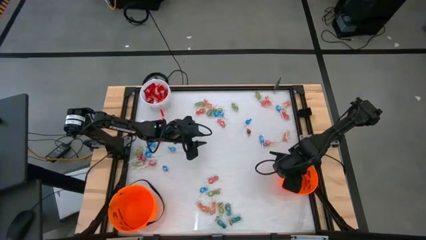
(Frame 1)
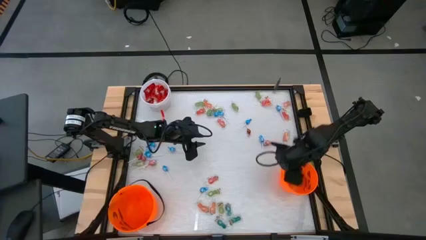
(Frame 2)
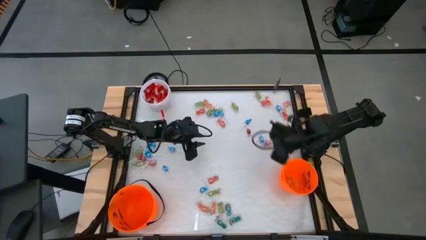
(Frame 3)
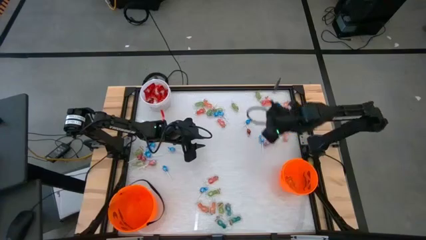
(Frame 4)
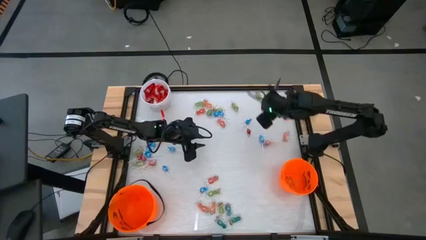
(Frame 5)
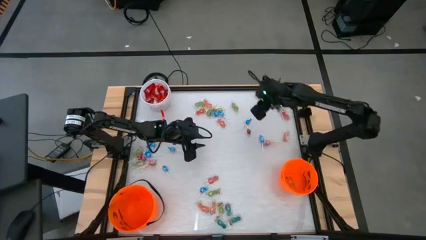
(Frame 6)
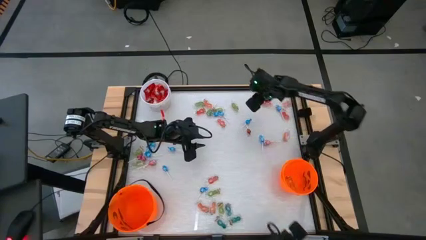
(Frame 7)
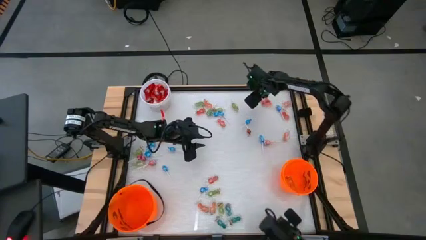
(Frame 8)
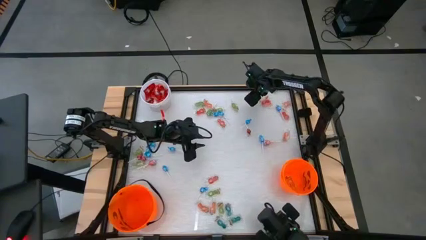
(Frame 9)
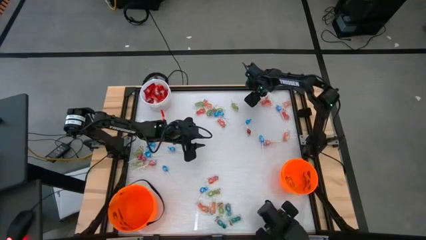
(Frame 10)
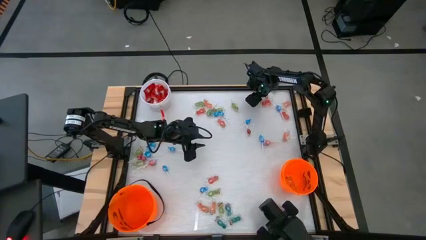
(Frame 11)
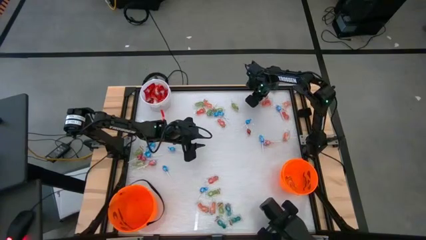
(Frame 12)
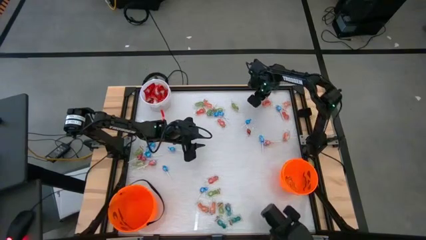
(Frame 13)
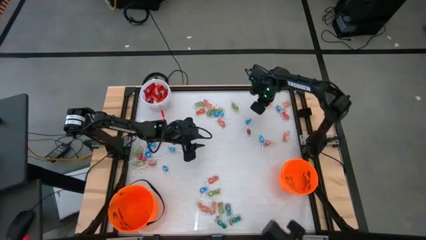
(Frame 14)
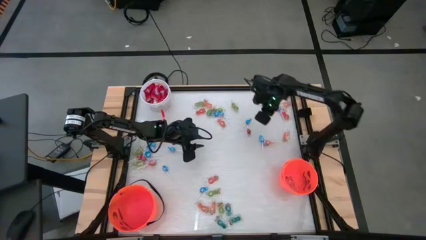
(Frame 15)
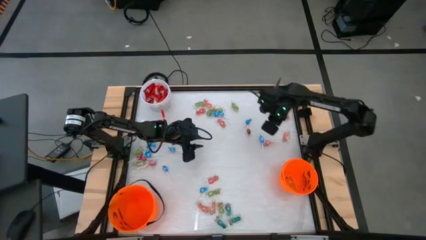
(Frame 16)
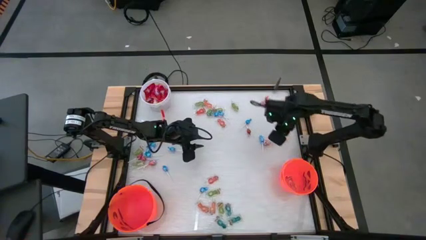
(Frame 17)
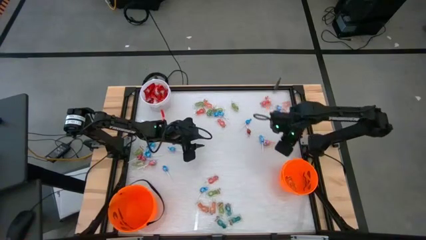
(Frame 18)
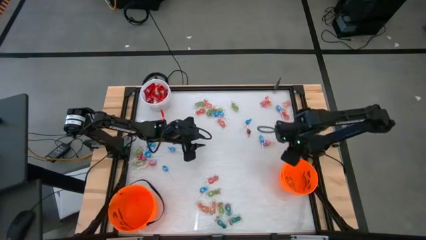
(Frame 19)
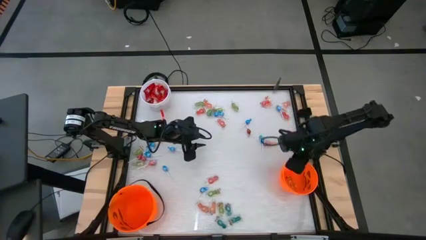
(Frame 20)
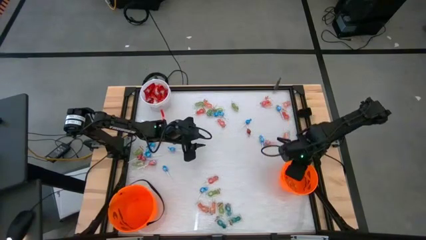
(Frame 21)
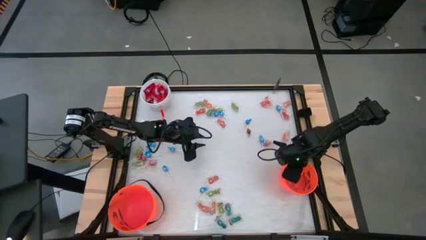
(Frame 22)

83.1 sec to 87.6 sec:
Task: Sort candy by brand, put in halloween buckets
Put the green candy into the right orange bucket

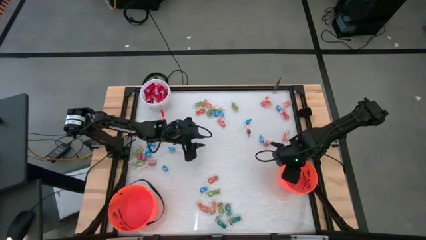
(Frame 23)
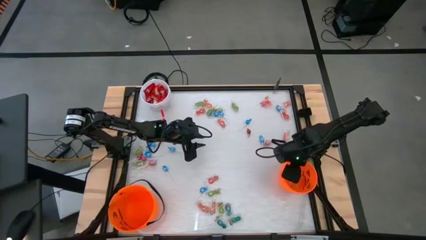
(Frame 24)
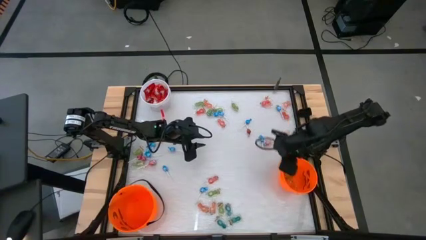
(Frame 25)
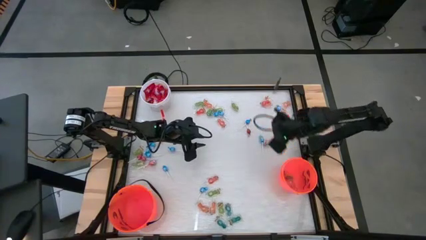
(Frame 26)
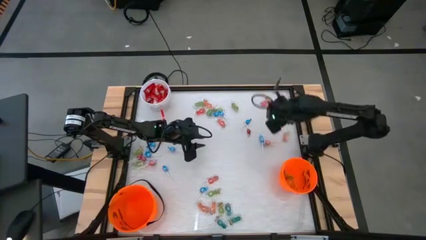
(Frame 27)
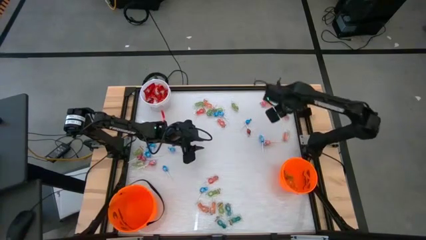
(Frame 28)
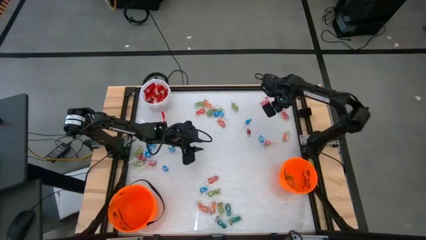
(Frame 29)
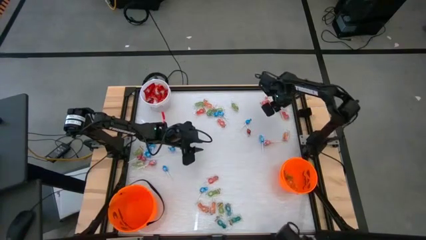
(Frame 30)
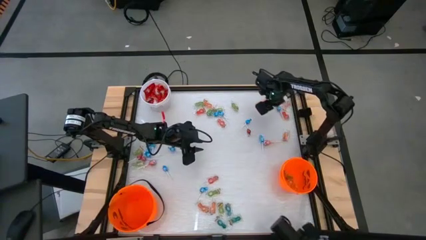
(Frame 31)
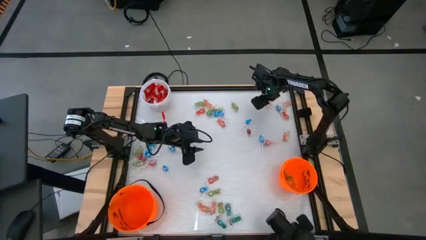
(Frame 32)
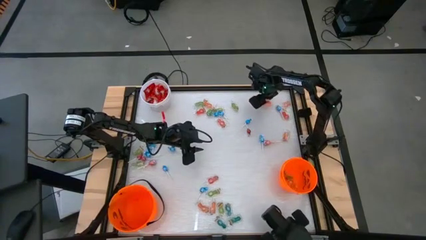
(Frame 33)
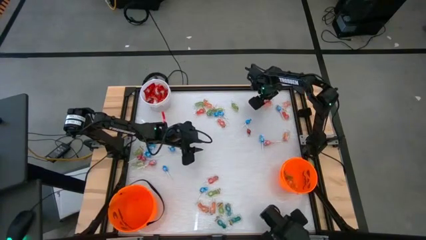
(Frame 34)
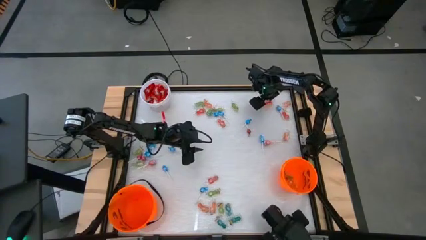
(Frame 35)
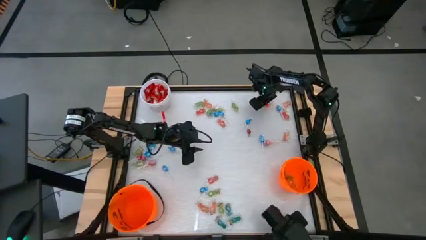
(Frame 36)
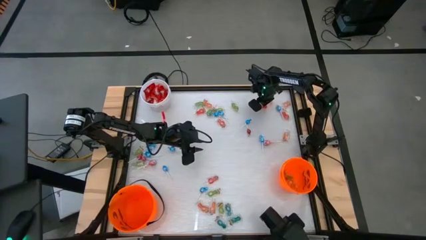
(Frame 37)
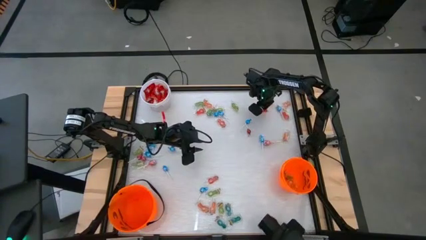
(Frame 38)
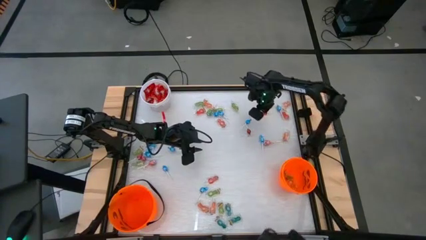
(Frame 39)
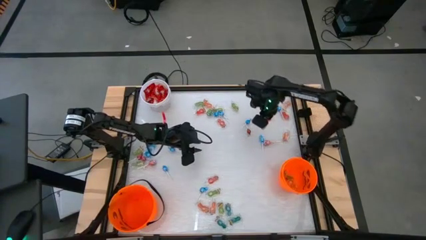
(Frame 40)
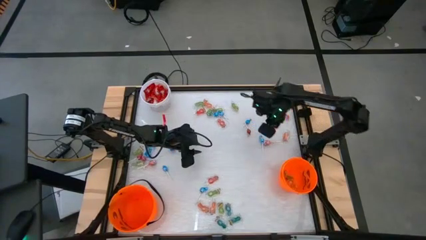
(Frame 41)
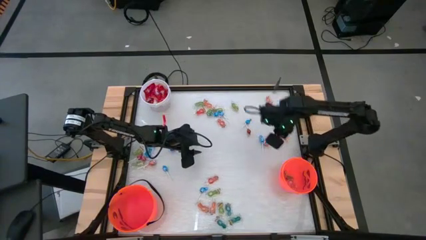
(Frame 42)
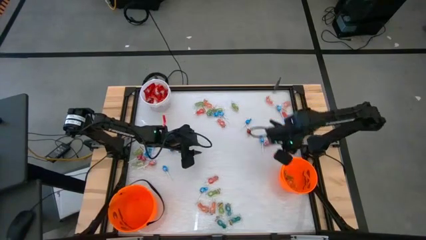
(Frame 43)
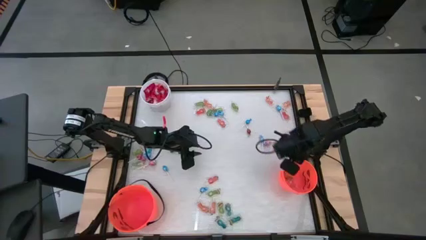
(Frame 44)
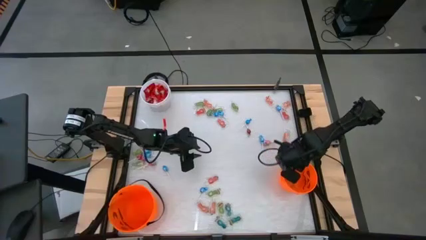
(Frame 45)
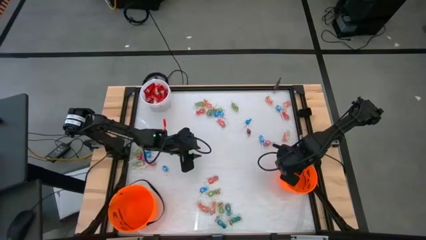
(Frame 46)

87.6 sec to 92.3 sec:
Put the orange candy into the right orange bucket

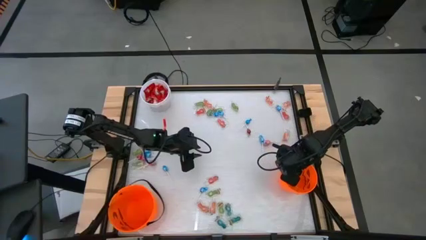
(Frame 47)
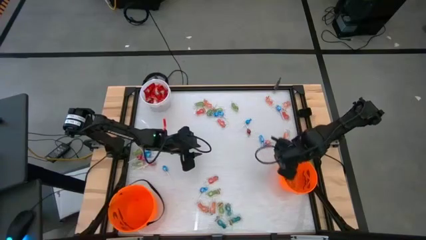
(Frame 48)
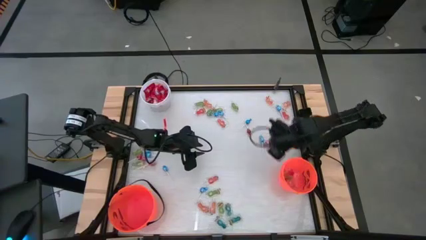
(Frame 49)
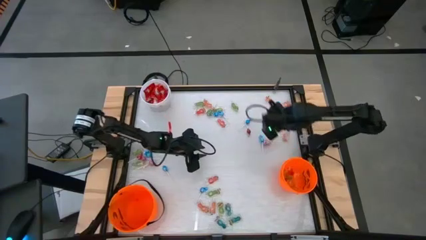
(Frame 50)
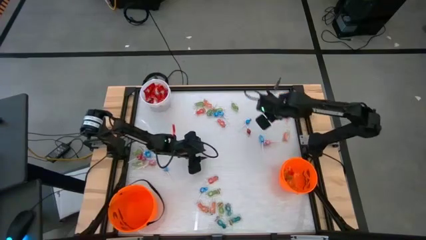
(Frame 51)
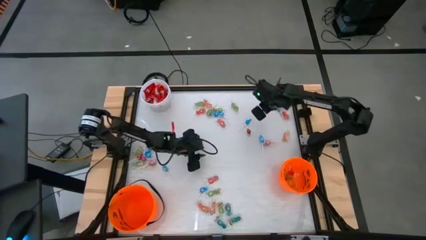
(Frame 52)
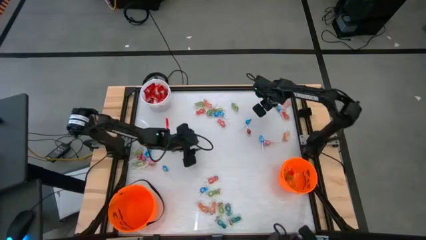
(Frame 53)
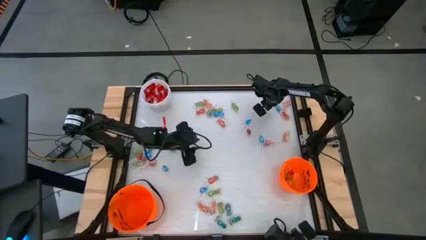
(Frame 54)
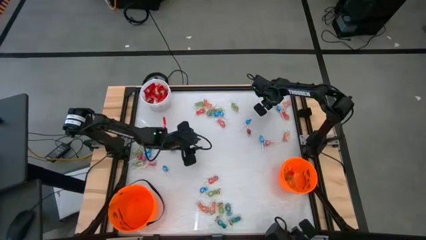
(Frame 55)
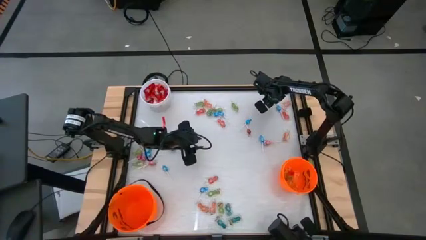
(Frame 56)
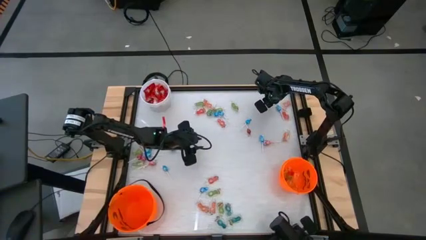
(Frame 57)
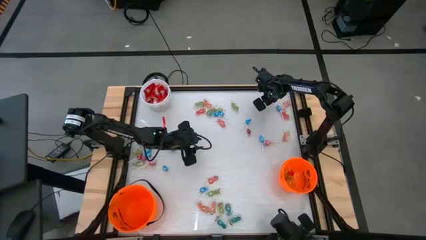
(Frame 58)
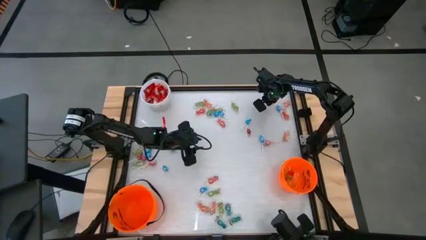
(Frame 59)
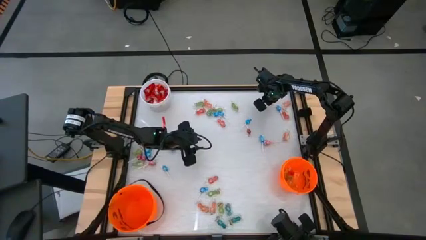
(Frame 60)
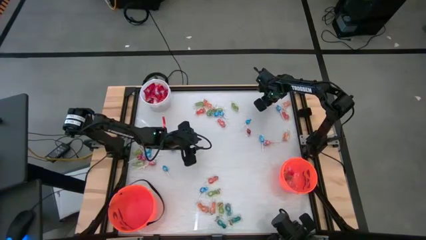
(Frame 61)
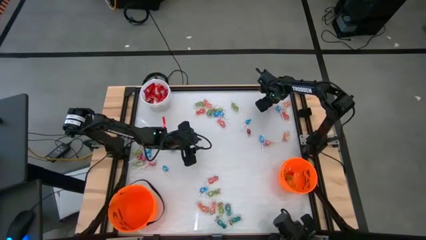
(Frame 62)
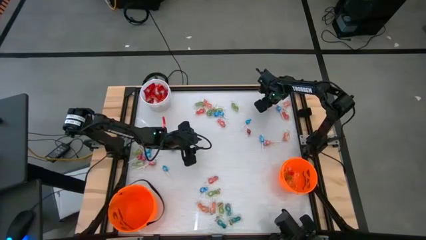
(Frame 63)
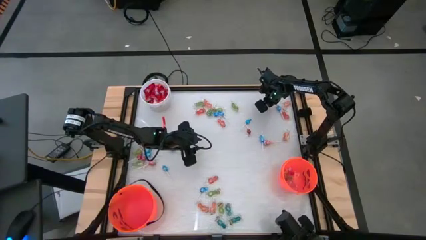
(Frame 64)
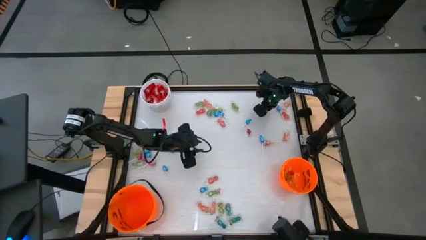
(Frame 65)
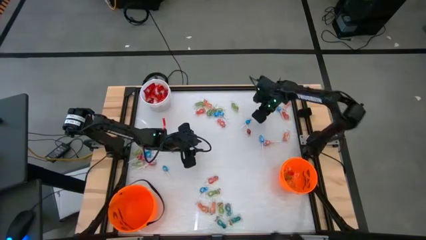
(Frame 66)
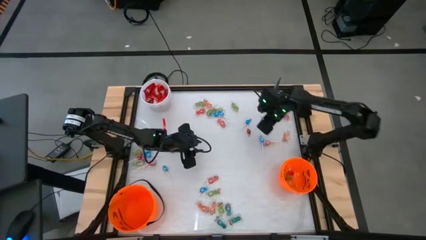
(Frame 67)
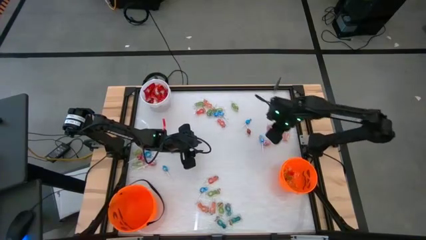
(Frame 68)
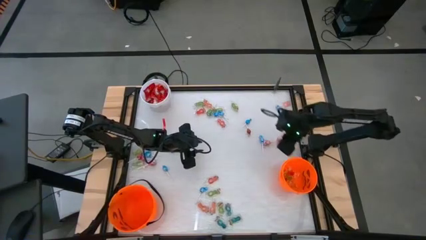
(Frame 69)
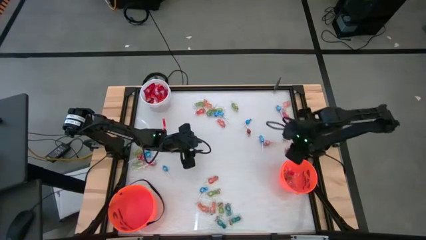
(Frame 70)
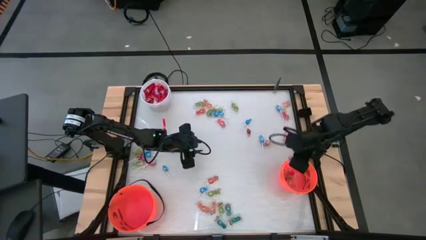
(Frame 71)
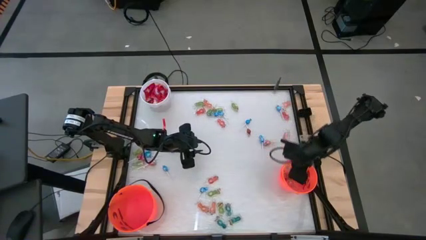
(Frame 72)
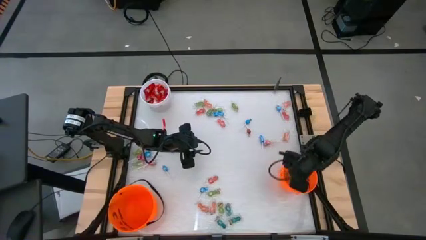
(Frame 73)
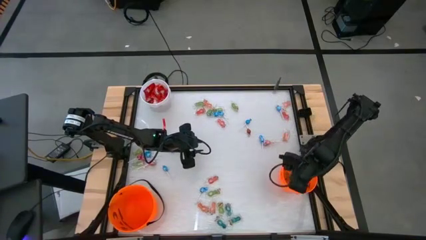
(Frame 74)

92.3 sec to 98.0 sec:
Put the orange candy into the right orange bucket

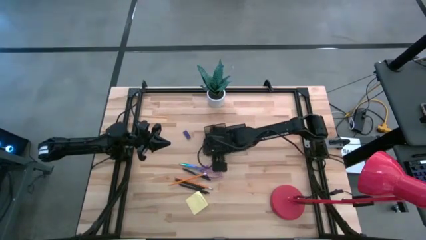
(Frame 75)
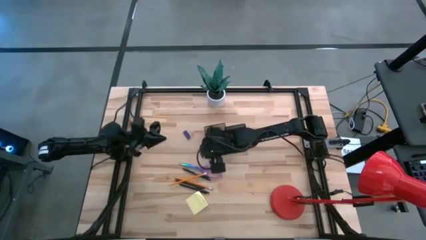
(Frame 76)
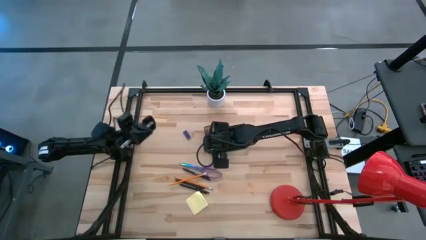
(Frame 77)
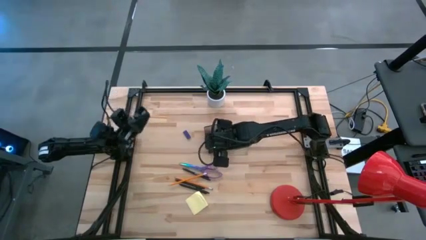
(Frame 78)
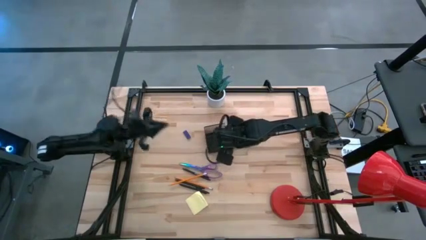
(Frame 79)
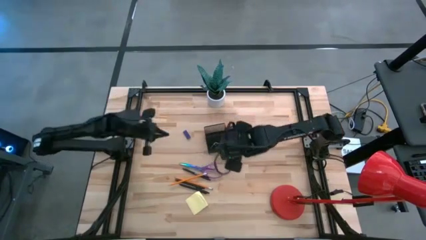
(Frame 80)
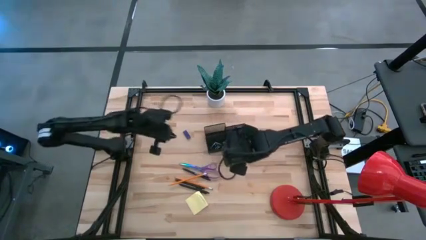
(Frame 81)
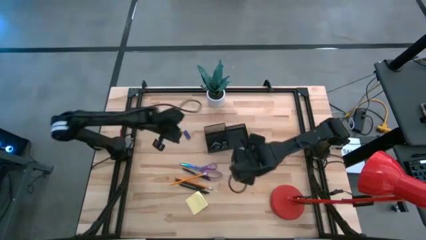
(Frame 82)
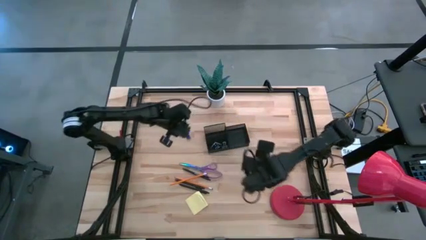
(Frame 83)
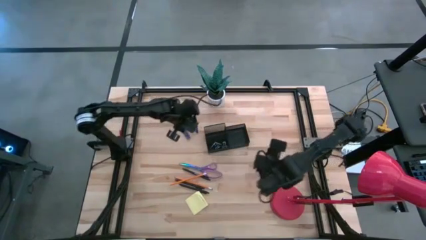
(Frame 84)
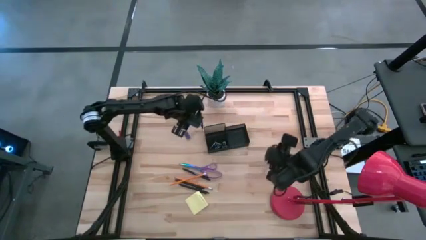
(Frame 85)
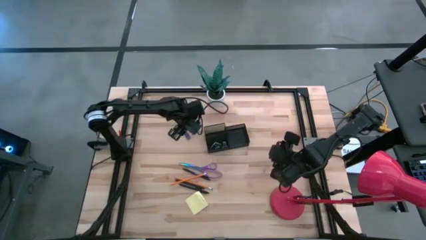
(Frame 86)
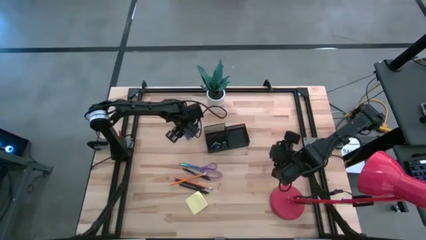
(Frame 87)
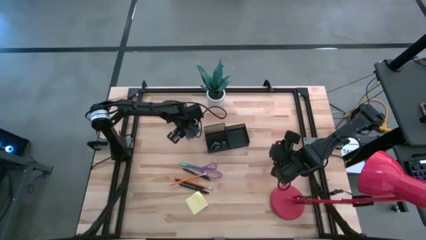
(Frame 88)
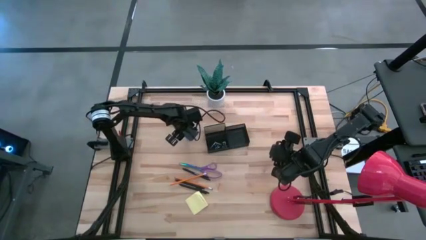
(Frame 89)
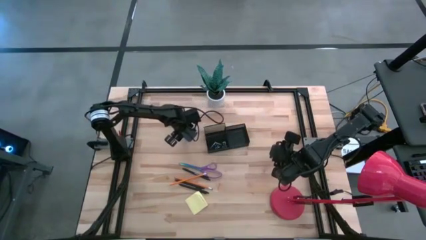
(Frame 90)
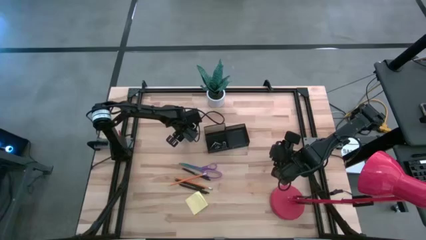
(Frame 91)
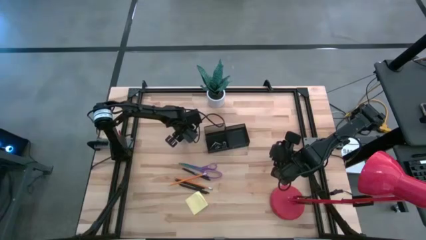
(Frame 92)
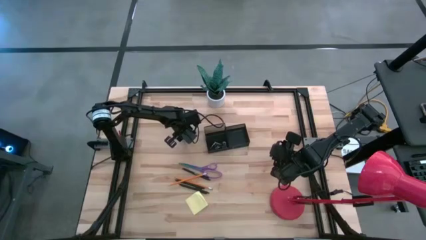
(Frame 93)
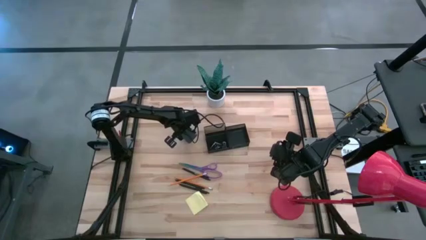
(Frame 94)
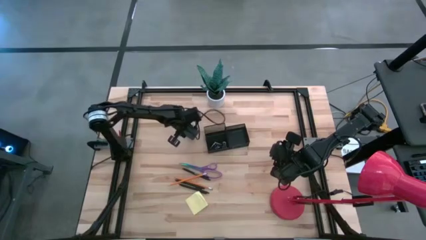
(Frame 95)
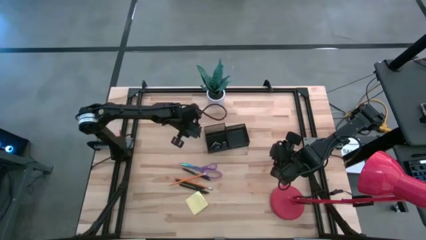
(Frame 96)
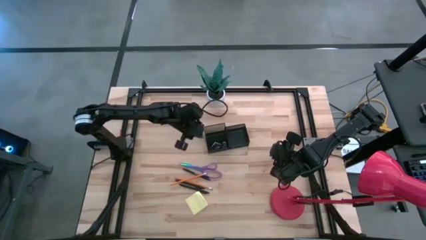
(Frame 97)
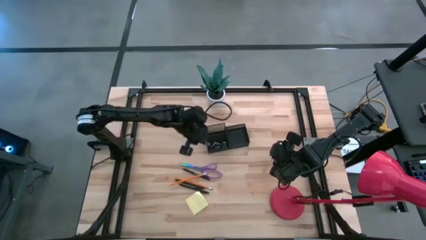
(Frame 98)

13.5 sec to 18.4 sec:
Task: Pick and place office supplies into organizer
Put the blue eraser into the black organizer
